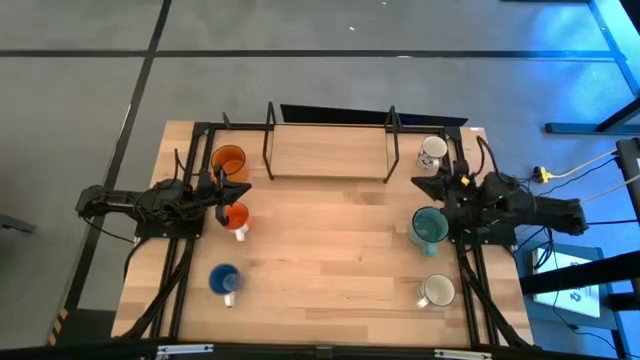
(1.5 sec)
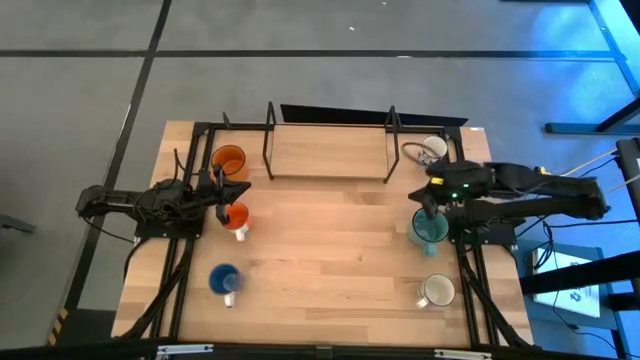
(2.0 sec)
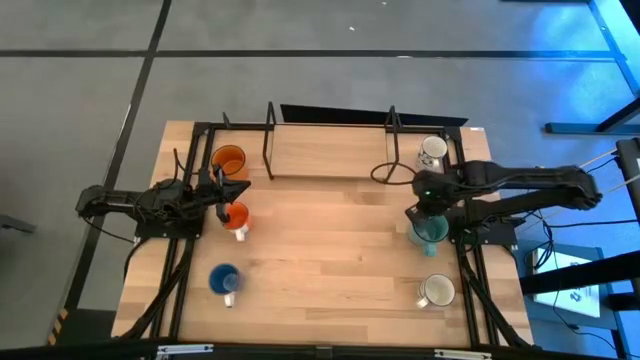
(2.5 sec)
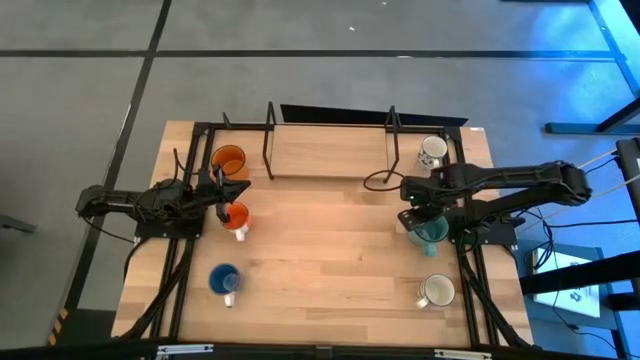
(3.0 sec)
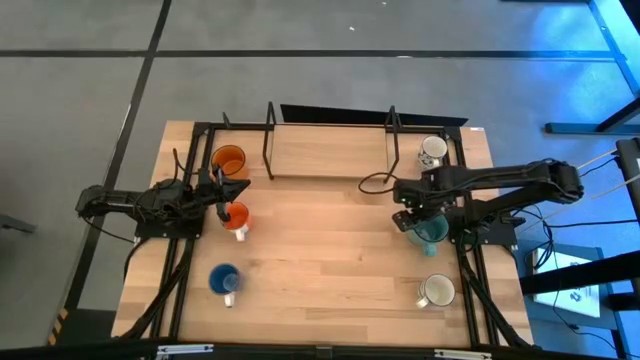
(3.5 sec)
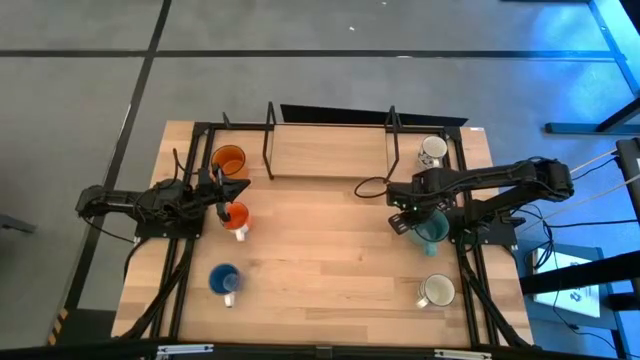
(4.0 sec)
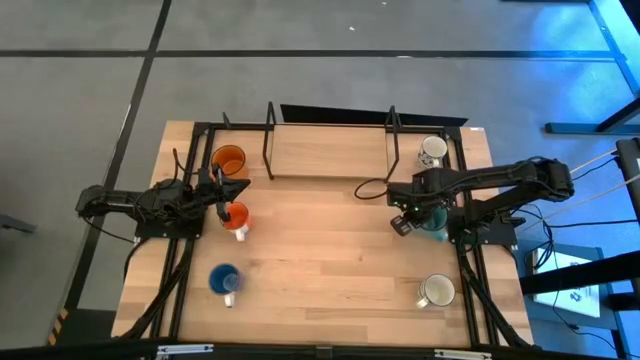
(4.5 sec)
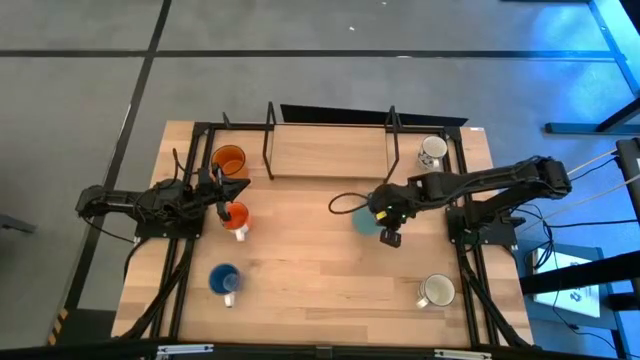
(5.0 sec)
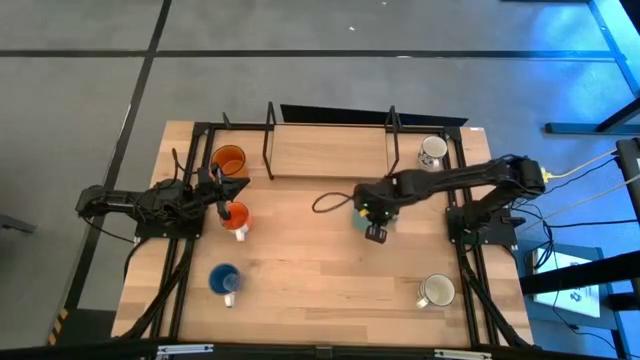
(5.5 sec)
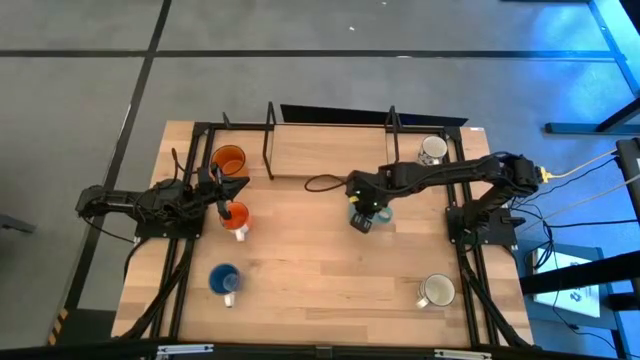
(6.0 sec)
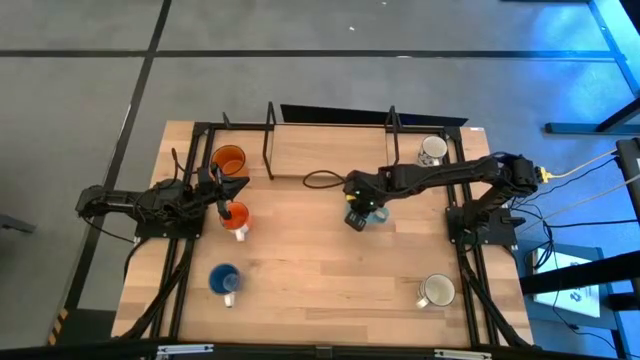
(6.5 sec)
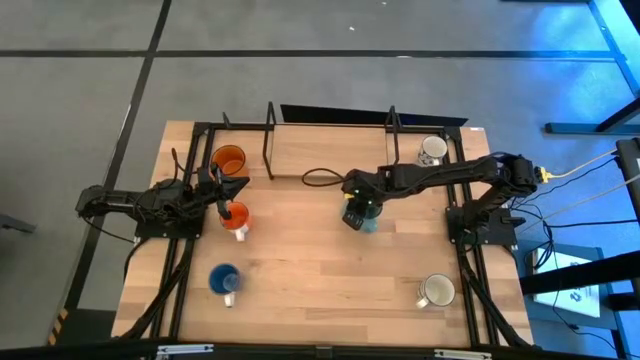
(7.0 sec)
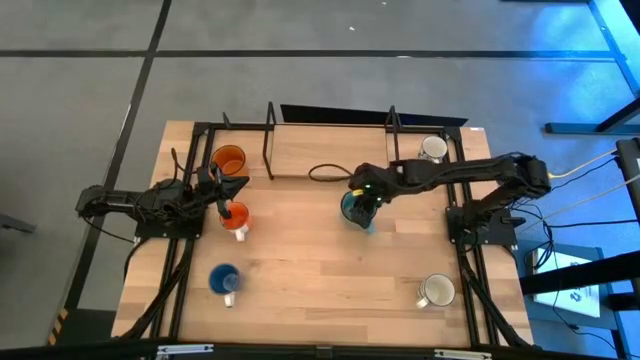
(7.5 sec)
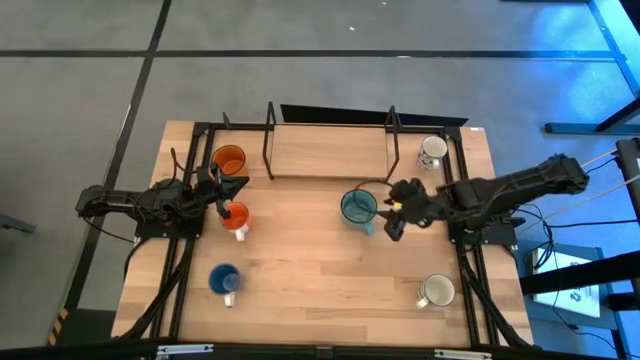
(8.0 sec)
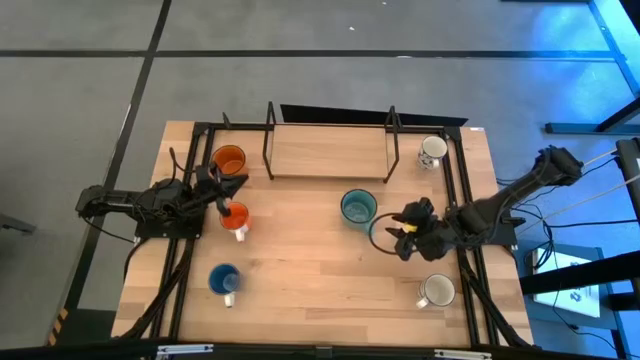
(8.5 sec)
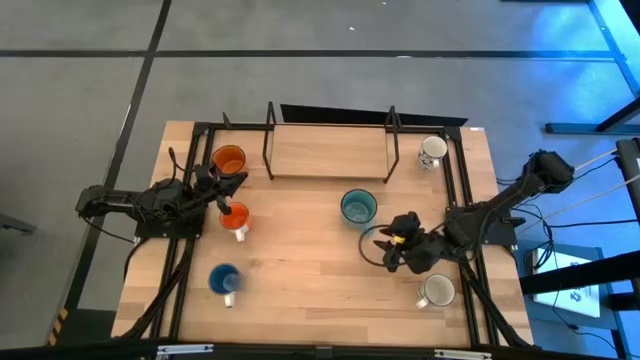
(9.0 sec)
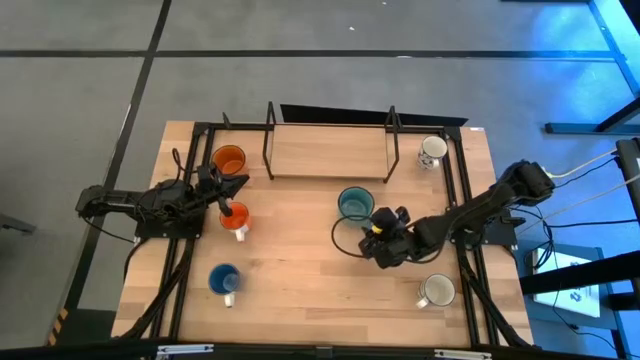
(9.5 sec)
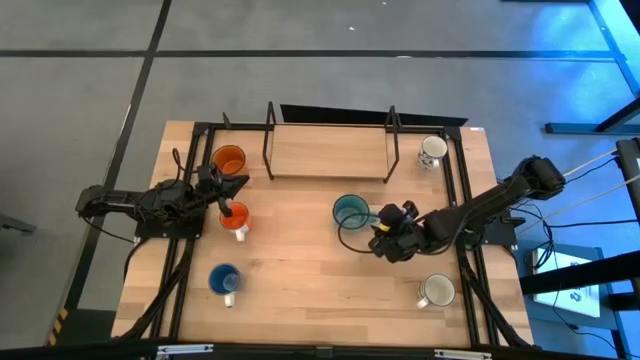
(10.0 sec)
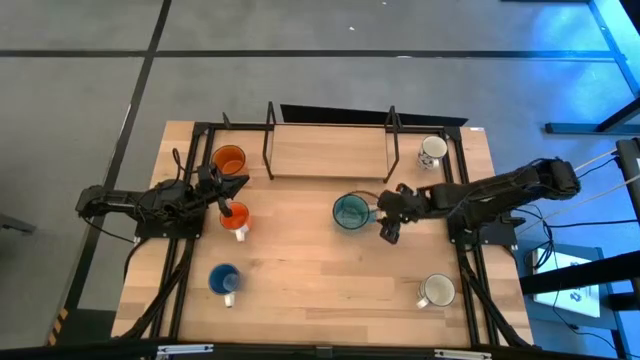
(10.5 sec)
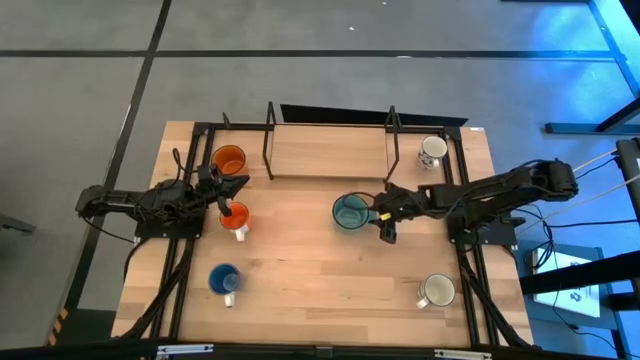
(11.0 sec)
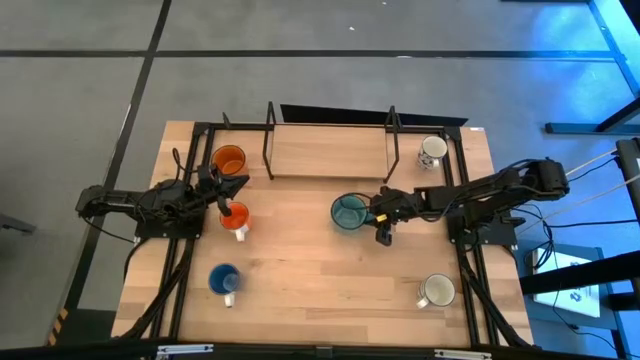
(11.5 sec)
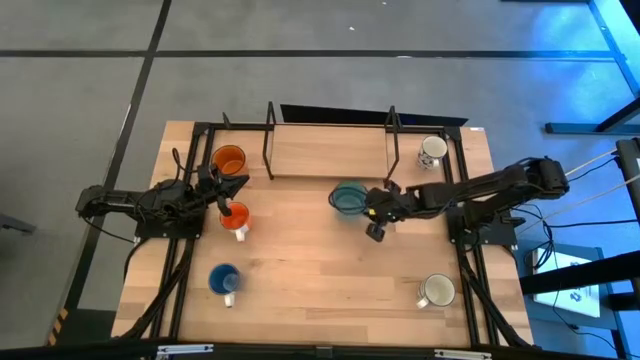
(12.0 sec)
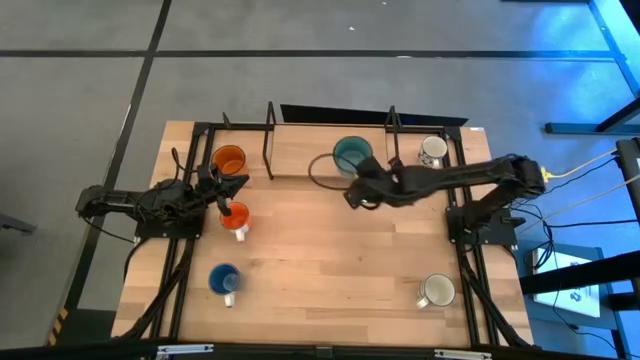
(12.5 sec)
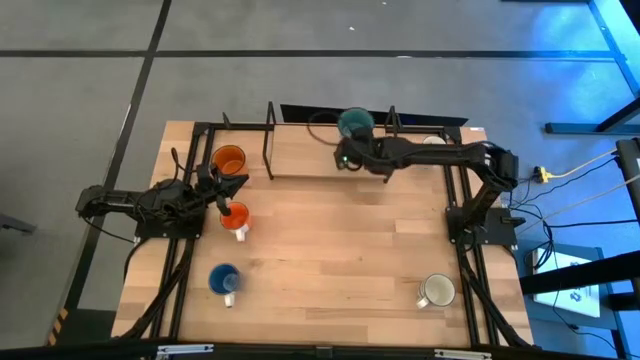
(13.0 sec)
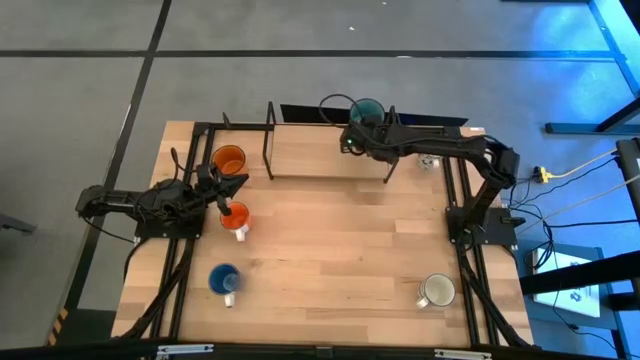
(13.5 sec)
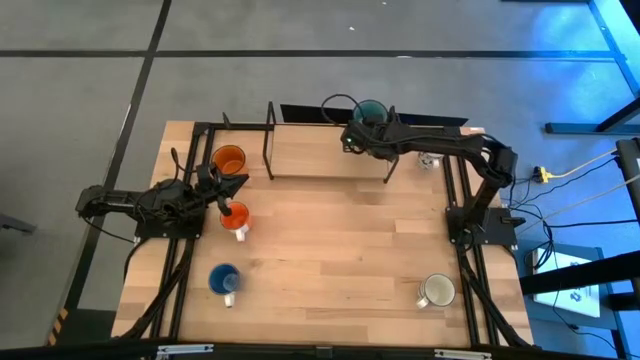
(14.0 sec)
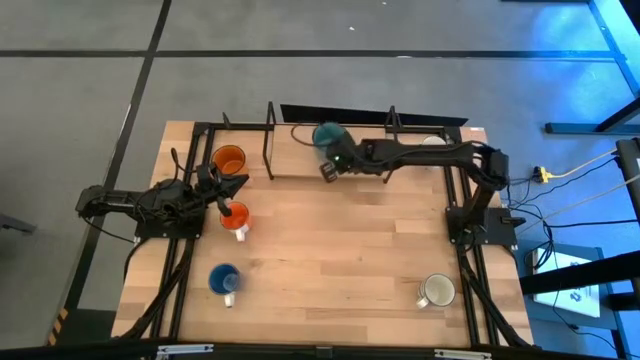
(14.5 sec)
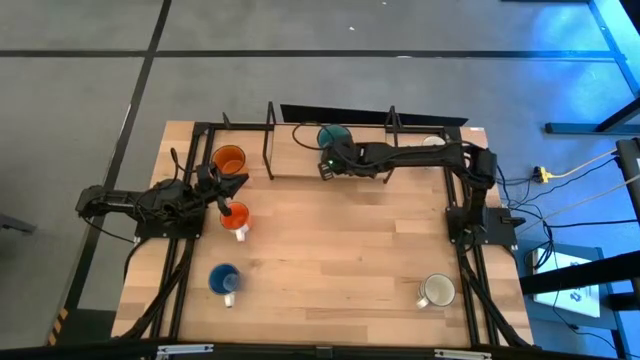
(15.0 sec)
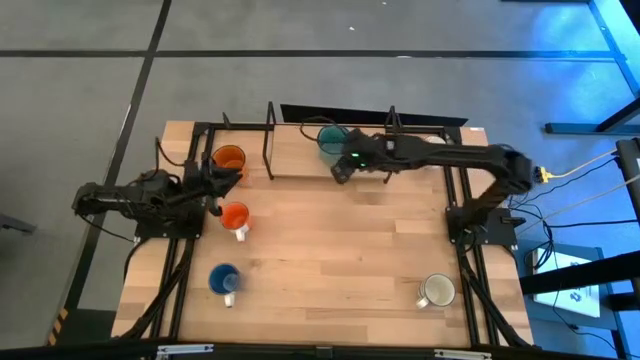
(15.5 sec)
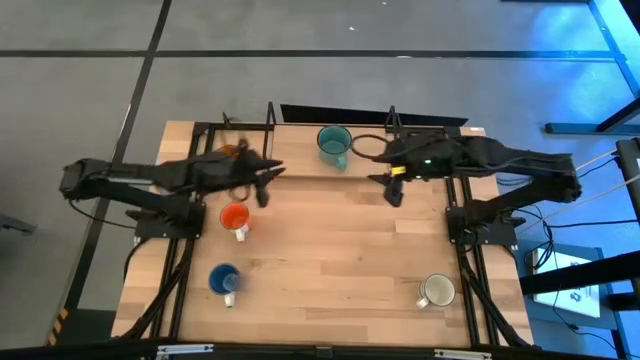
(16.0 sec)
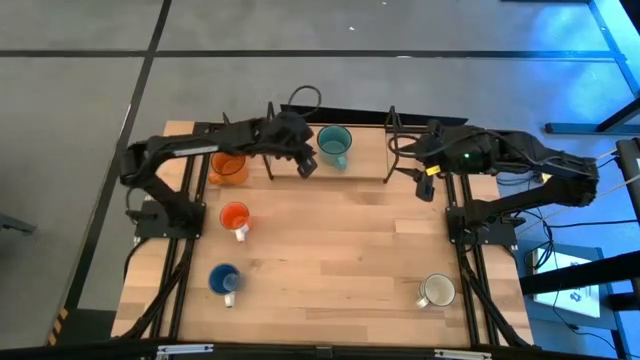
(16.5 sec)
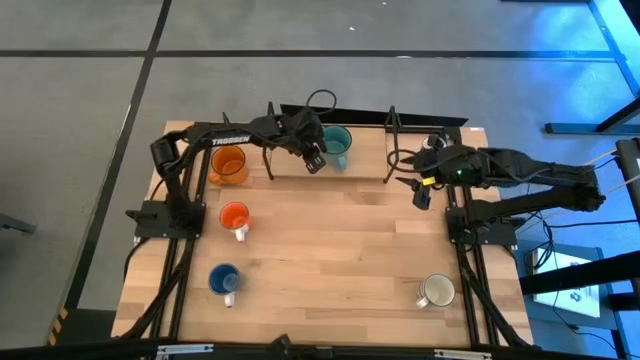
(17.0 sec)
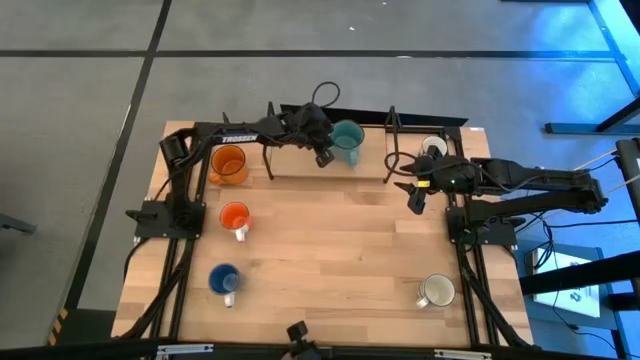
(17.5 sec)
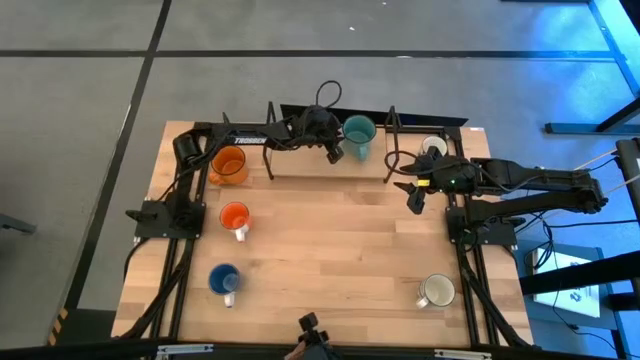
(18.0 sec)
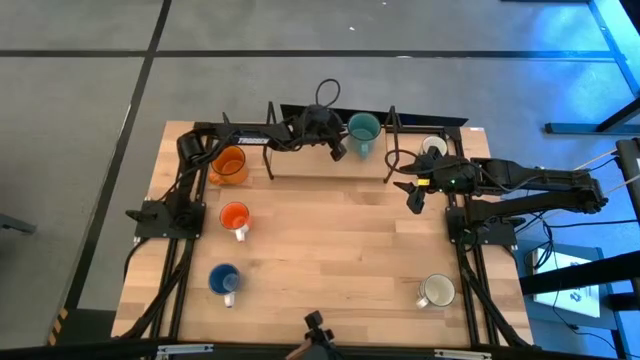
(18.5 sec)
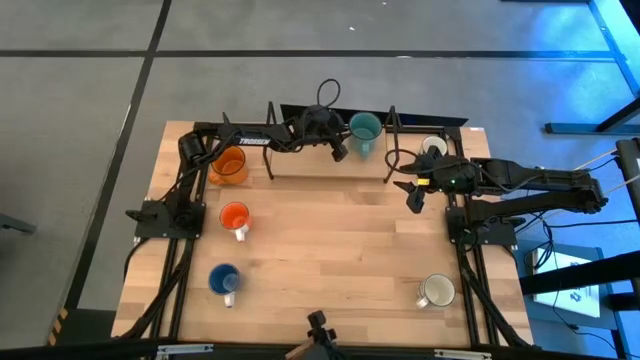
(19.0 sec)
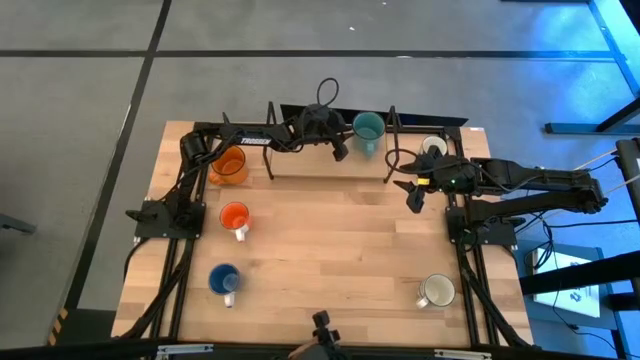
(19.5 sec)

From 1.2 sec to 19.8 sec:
Task: Place coffee mugs
Put the blue mug on the shelf
